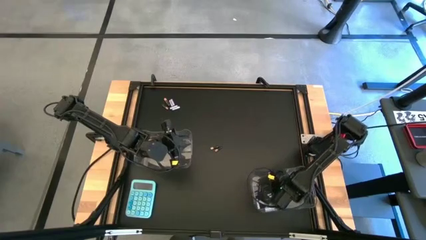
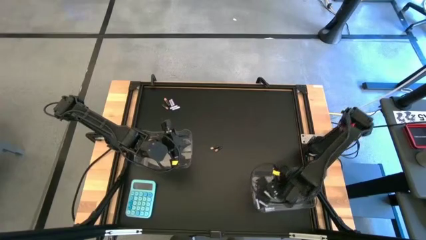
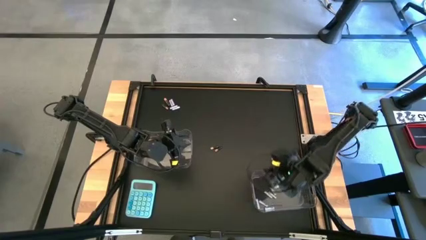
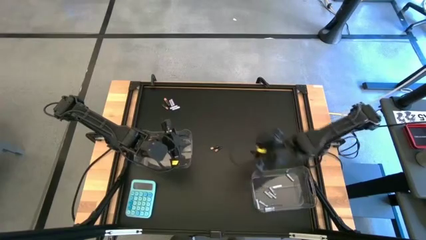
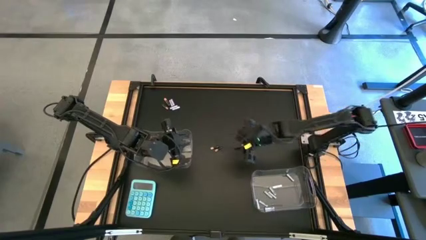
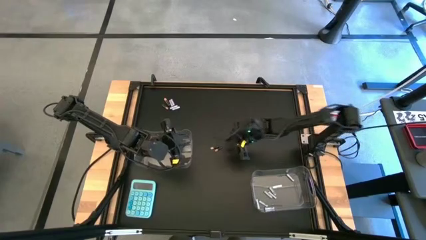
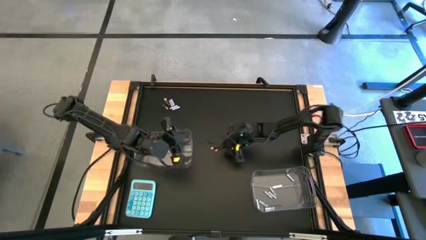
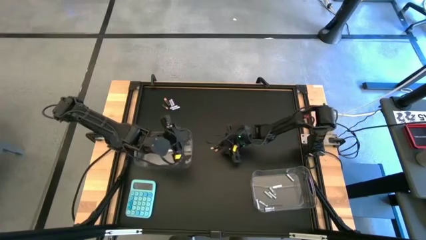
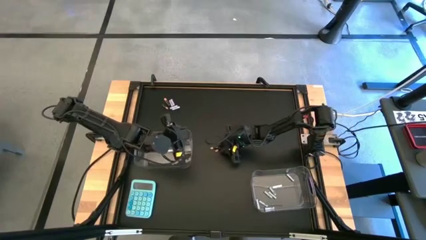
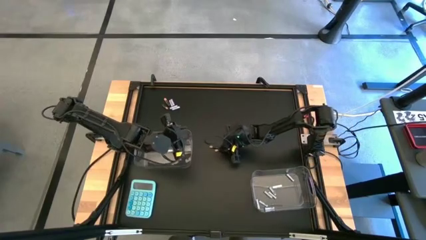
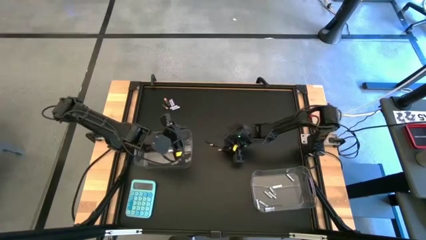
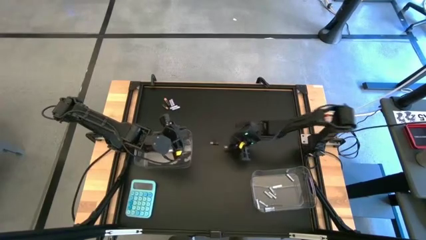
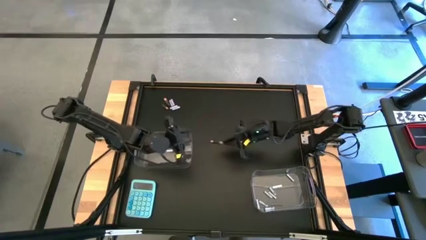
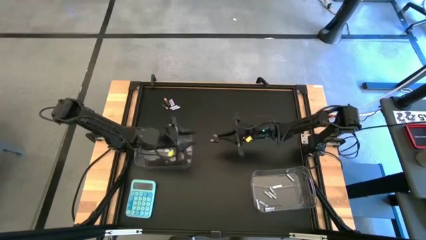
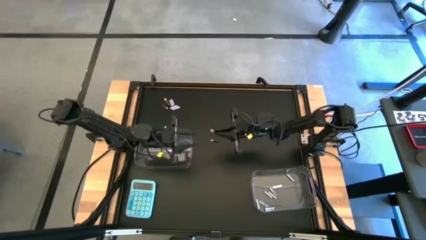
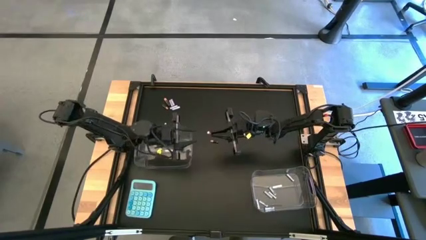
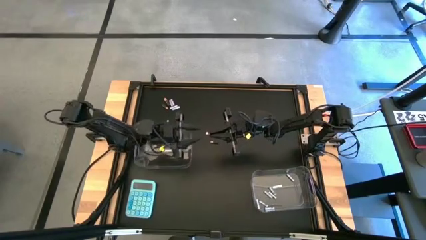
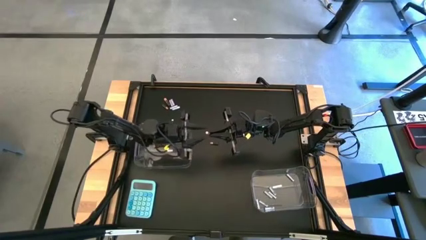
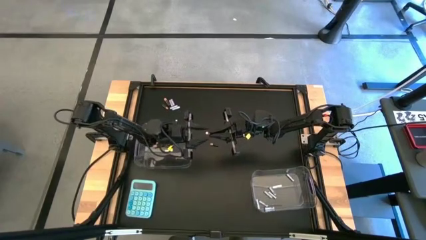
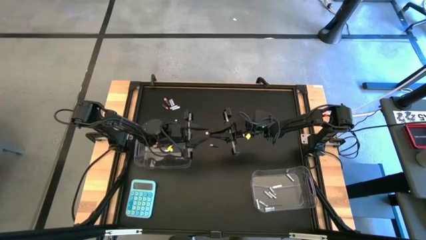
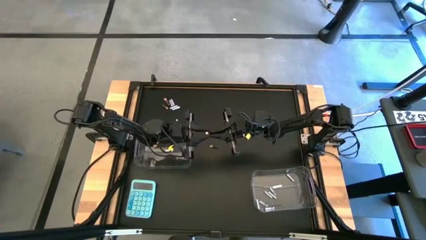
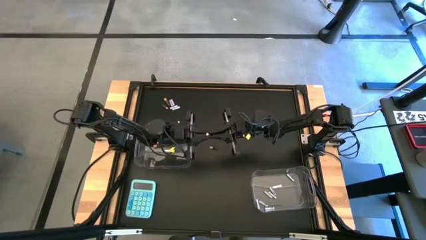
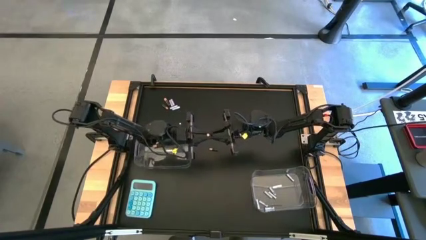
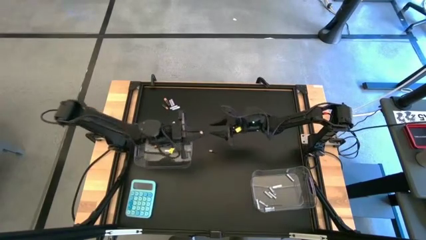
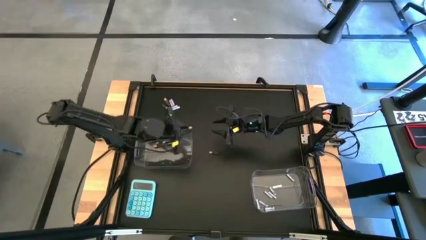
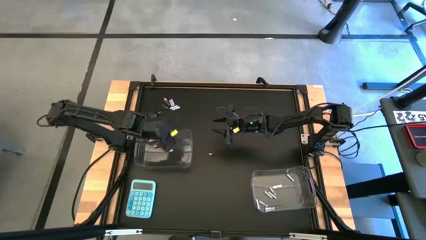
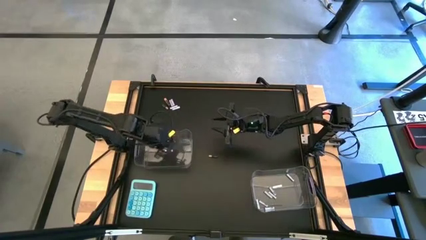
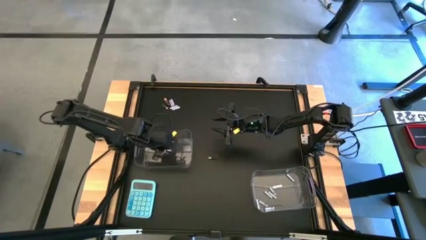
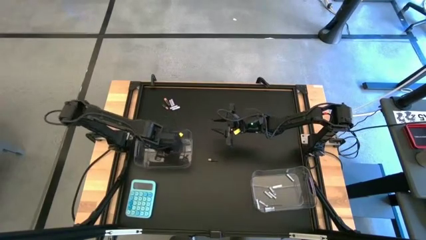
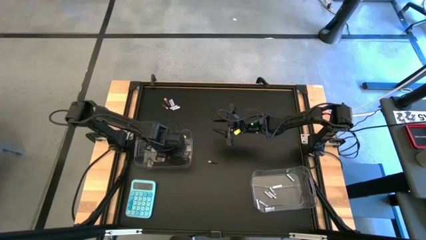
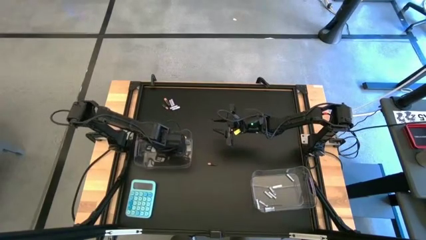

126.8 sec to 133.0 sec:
Task: Sort batteries
Put the black battery into the left transparent bin

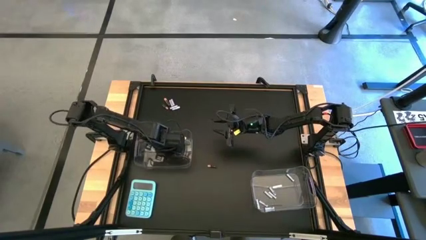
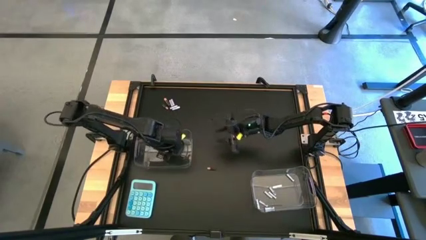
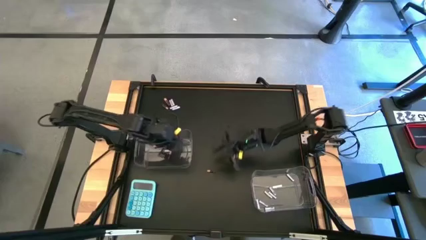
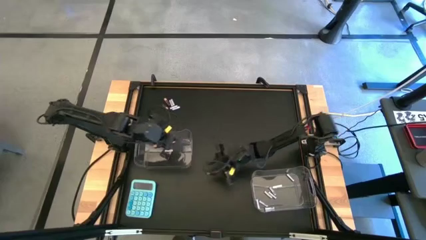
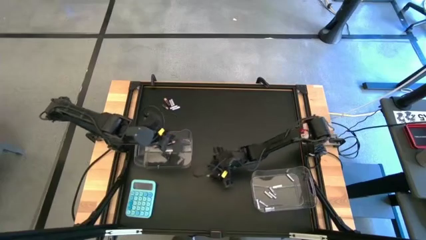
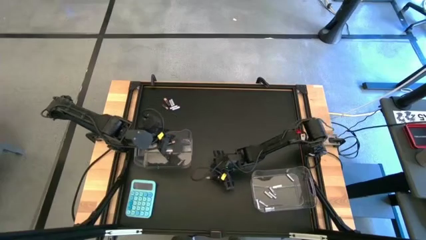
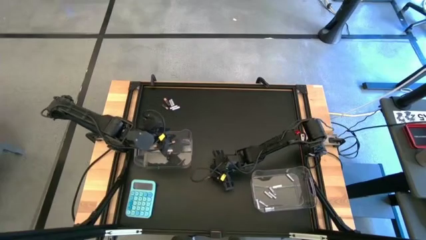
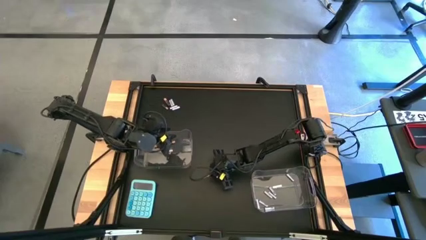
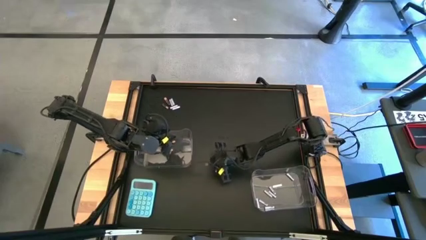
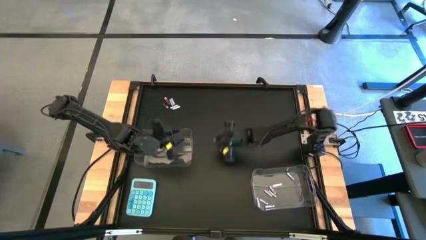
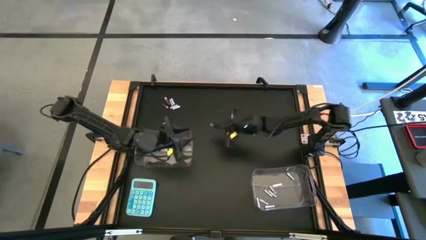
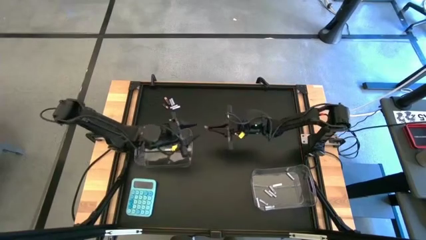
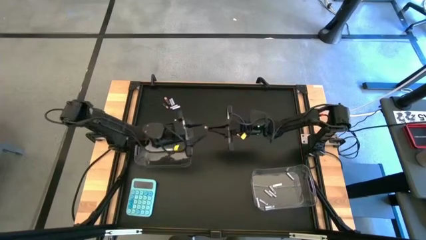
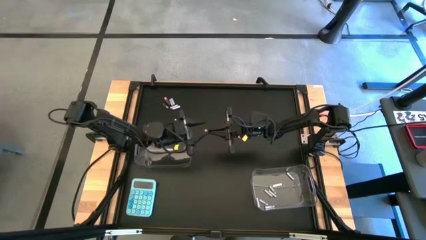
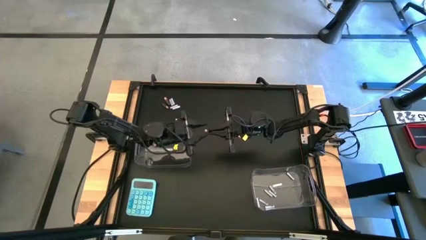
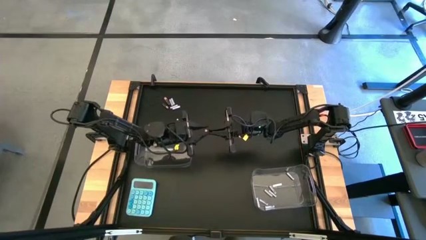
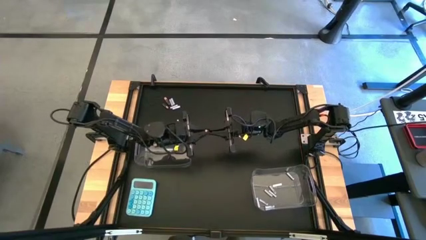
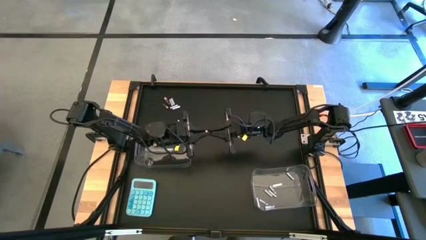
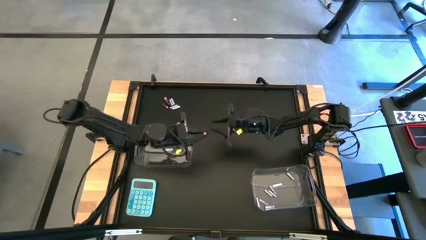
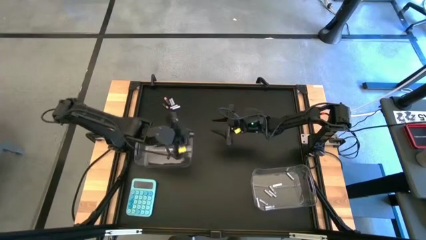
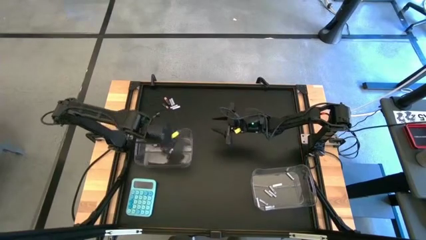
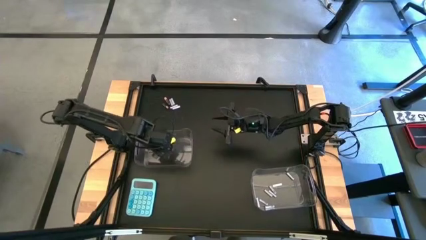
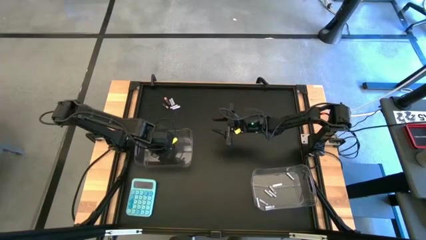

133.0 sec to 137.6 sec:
Put the black battery into the left transparent bin

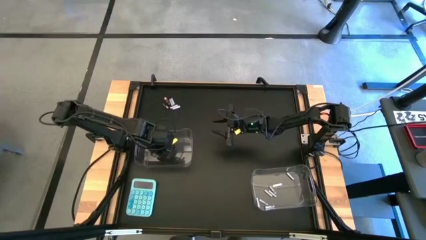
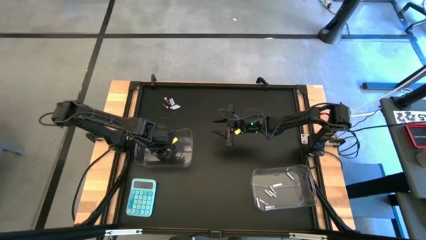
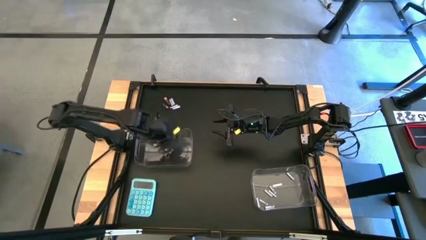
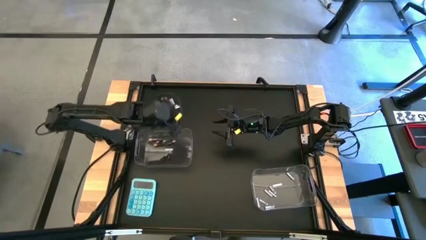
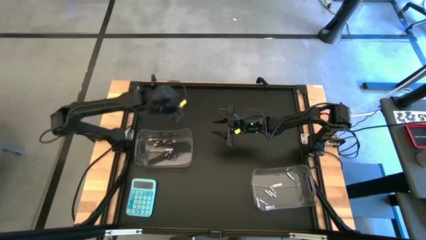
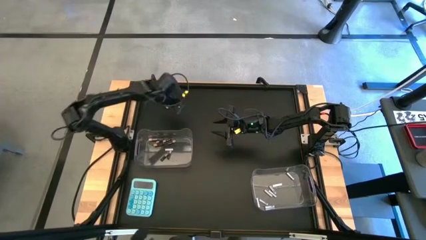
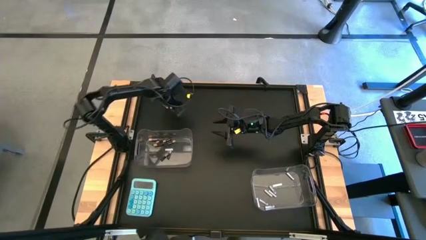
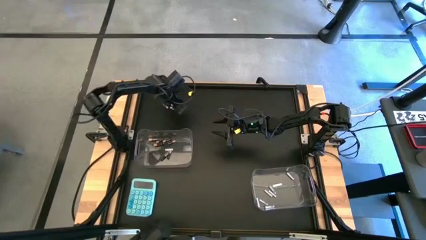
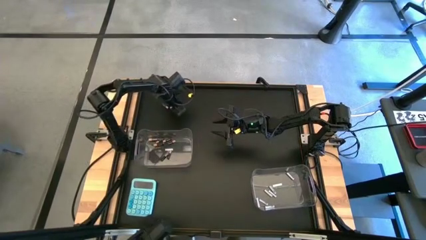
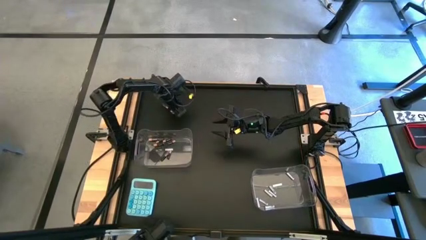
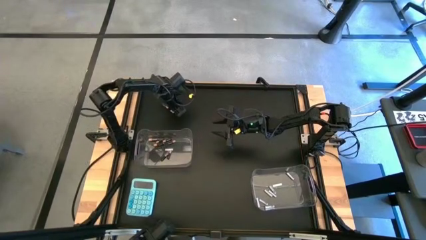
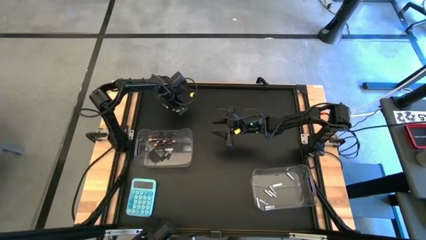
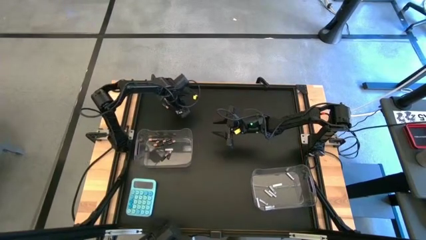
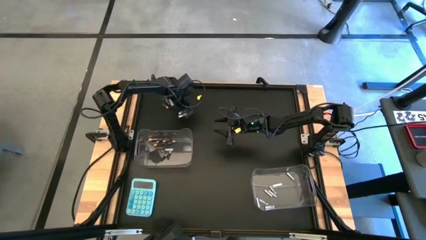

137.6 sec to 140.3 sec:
Put the white battery into the right transparent bin

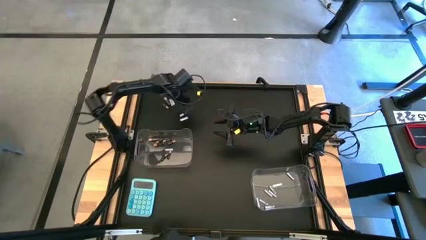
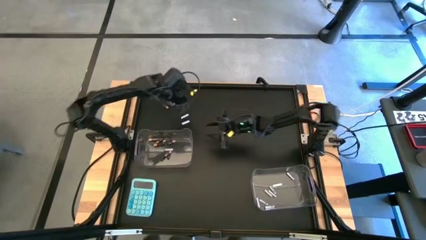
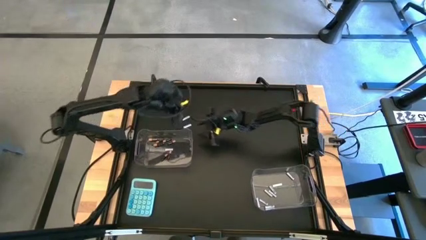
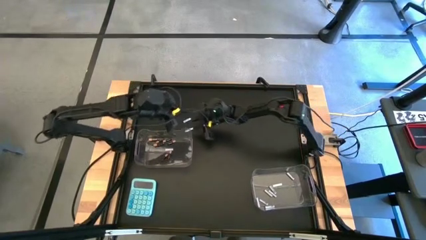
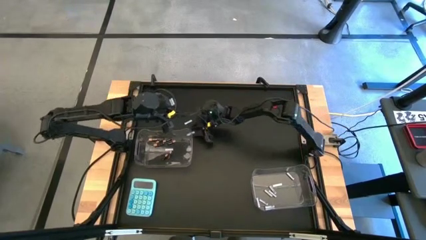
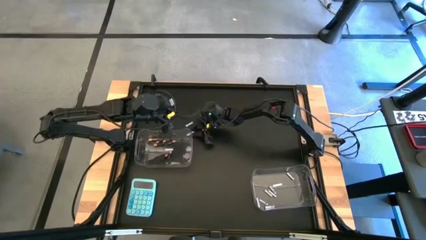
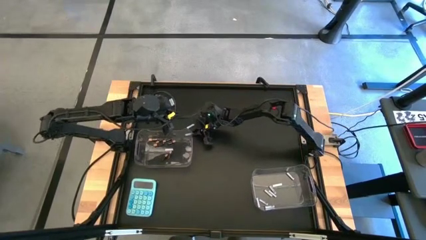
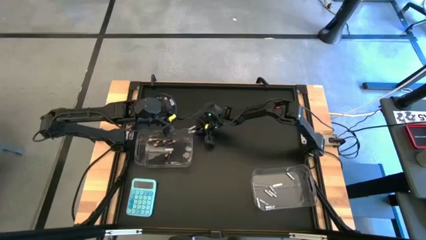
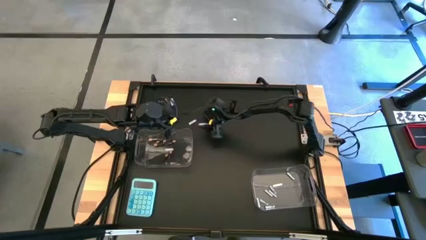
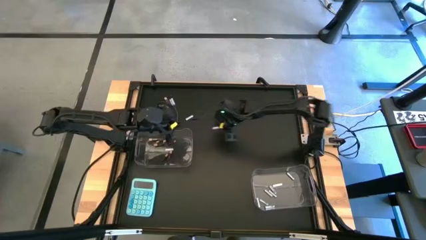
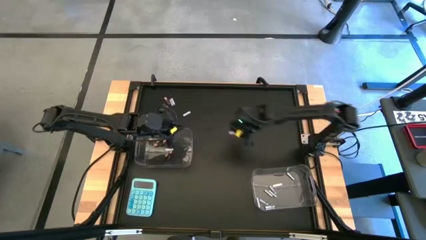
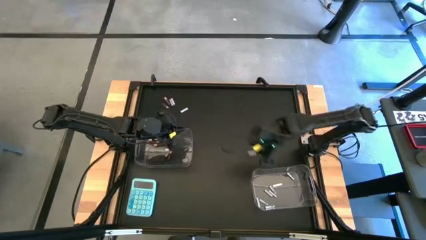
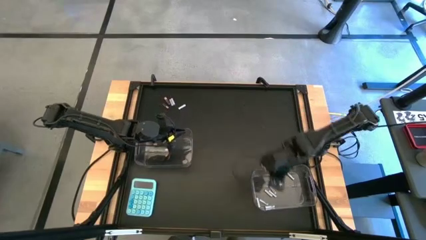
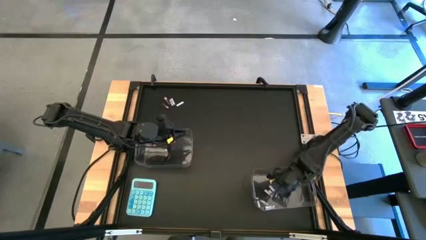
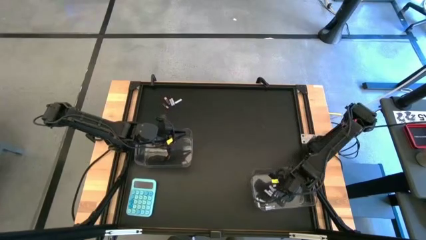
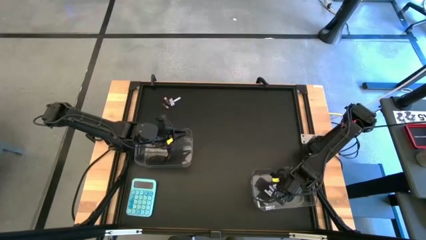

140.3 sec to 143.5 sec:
Put the white battery into the right transparent bin
